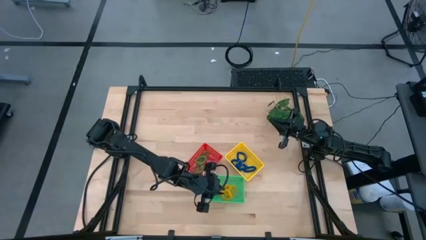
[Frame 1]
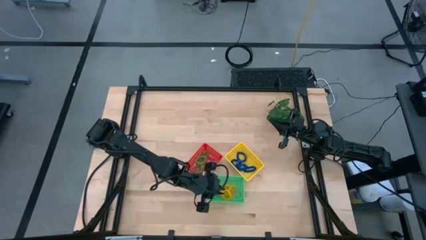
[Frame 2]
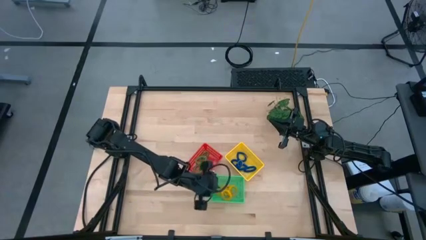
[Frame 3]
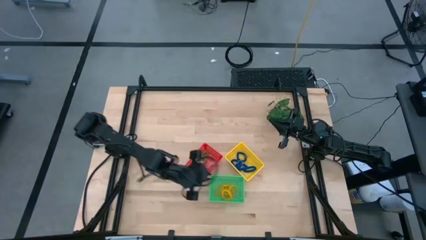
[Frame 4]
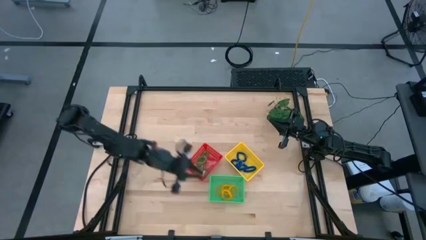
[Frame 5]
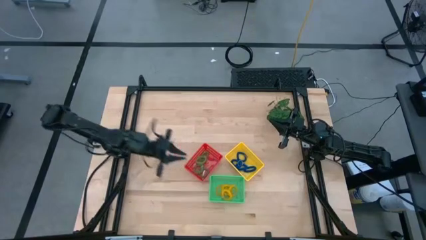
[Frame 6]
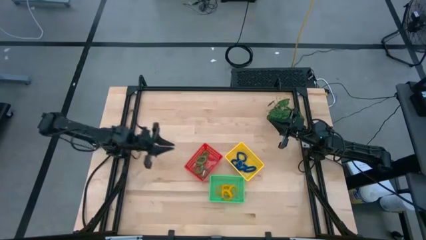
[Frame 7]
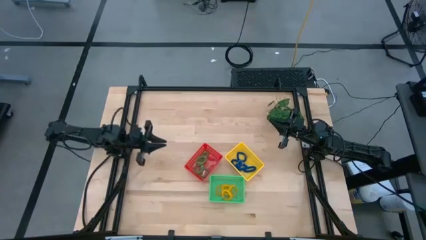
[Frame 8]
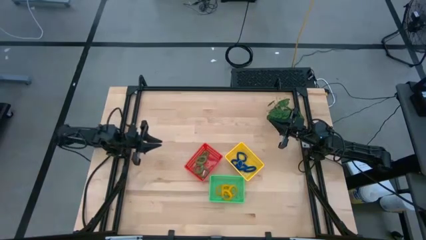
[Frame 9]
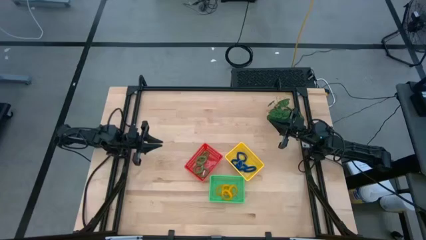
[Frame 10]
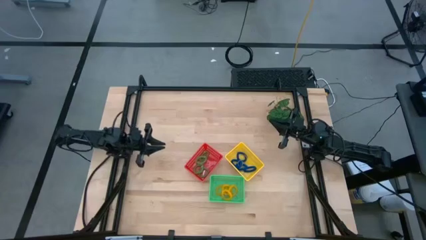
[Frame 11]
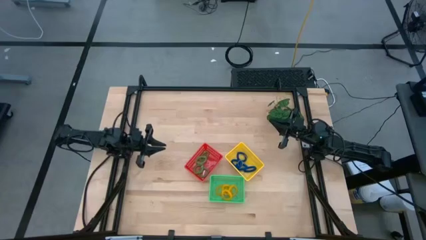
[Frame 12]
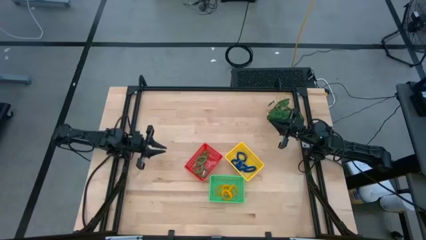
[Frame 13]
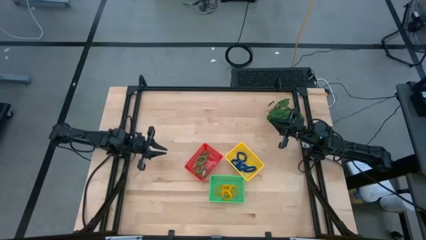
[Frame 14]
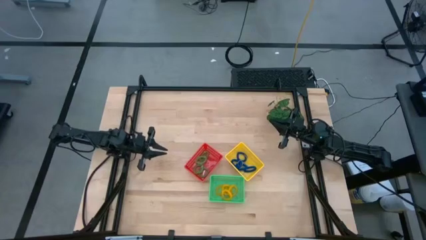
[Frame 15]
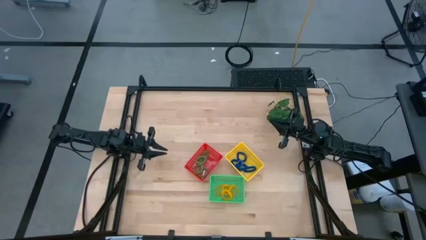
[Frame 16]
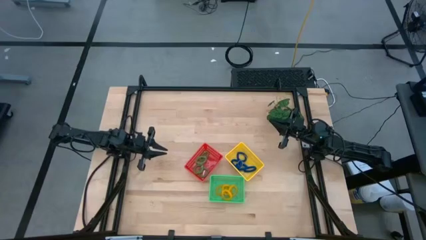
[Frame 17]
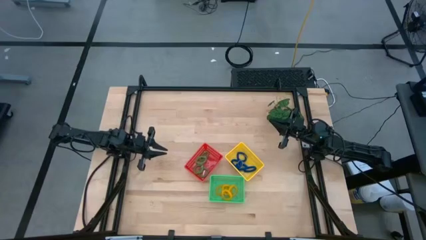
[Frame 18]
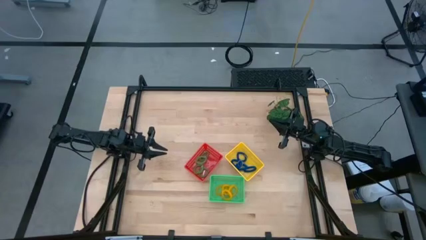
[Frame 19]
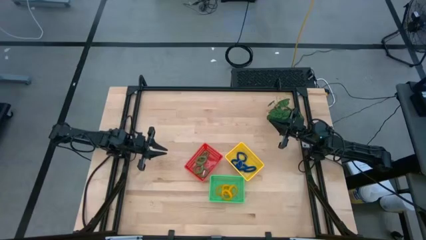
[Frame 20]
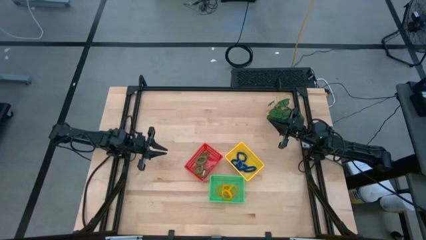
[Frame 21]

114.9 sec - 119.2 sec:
Task: Sort spring keychains
Return to Home Position

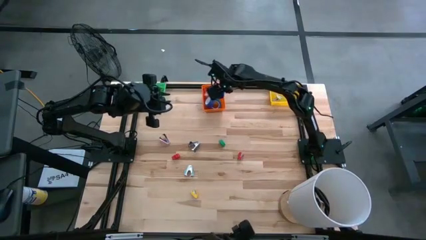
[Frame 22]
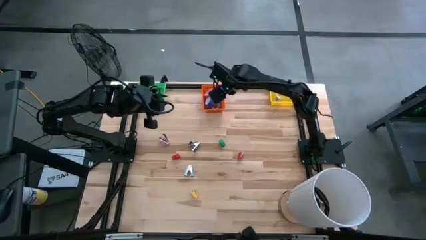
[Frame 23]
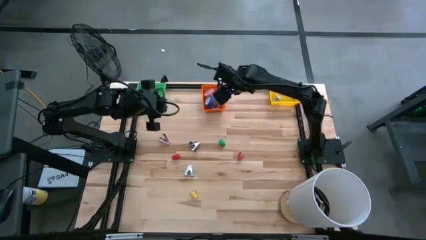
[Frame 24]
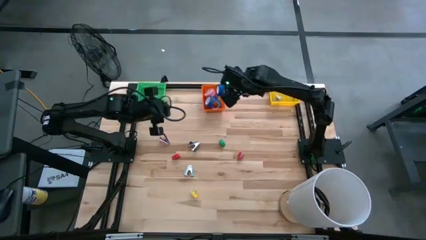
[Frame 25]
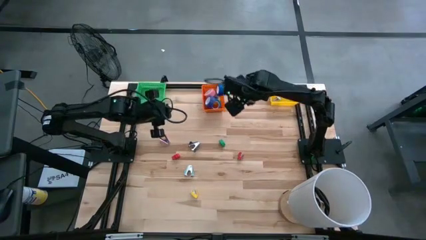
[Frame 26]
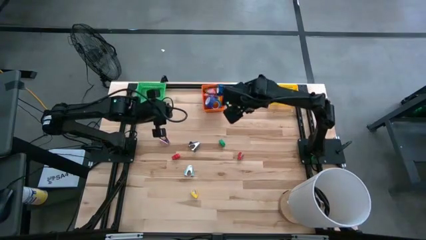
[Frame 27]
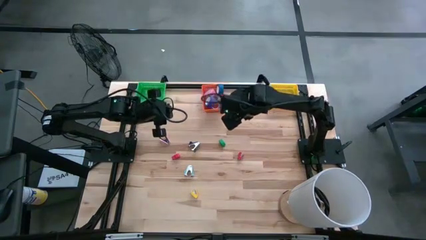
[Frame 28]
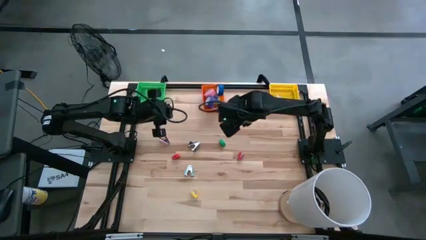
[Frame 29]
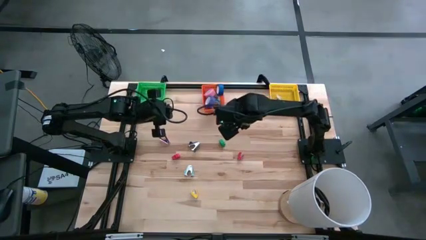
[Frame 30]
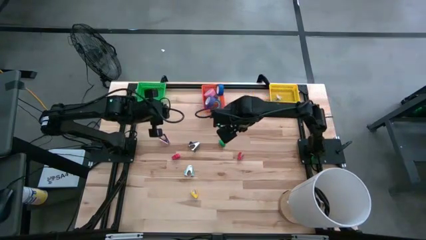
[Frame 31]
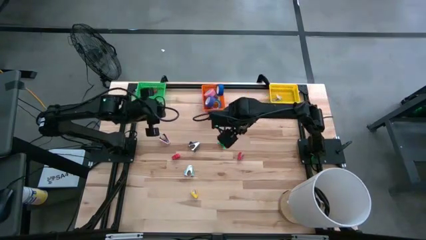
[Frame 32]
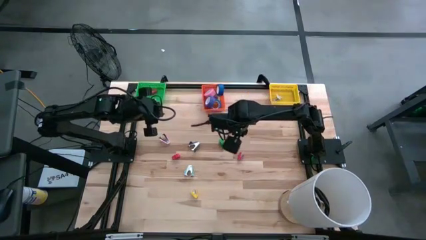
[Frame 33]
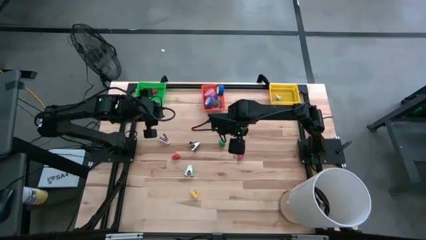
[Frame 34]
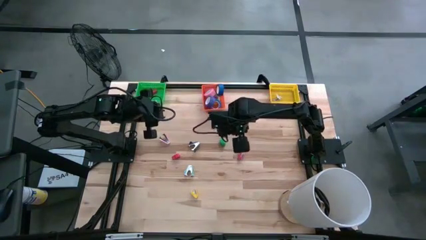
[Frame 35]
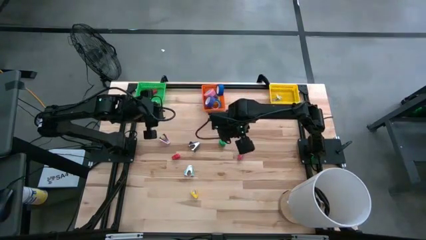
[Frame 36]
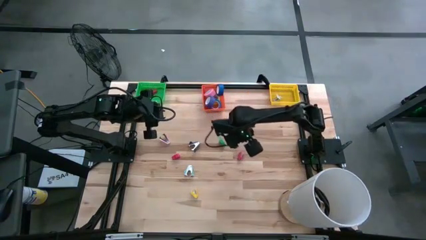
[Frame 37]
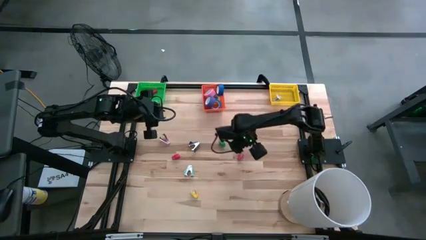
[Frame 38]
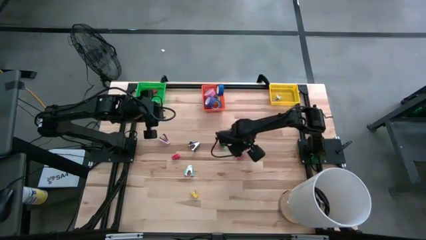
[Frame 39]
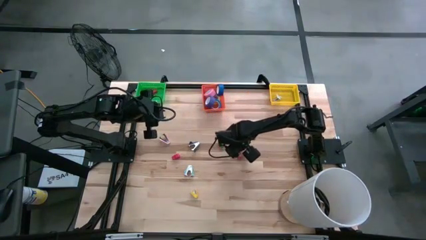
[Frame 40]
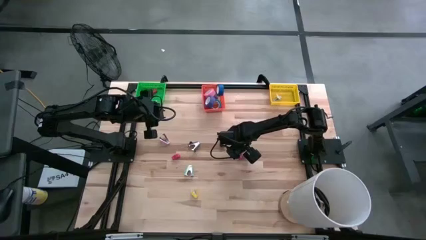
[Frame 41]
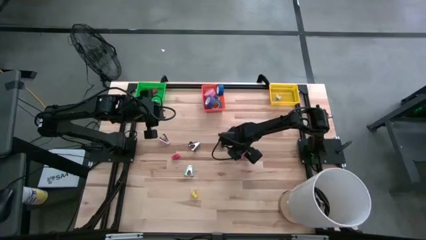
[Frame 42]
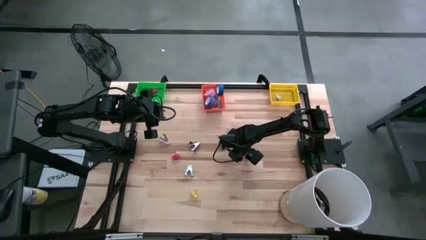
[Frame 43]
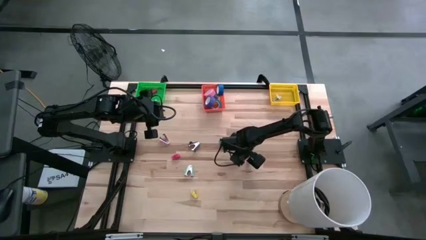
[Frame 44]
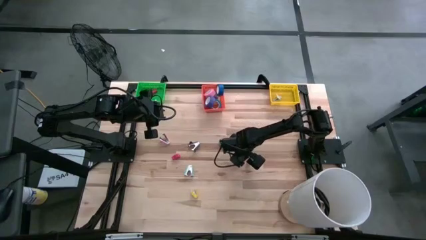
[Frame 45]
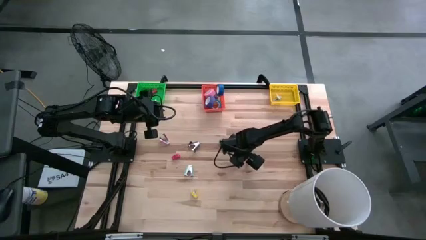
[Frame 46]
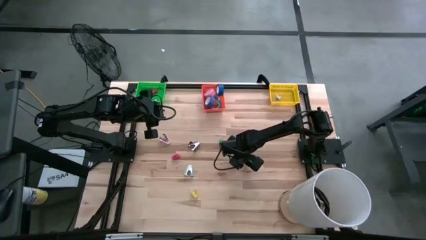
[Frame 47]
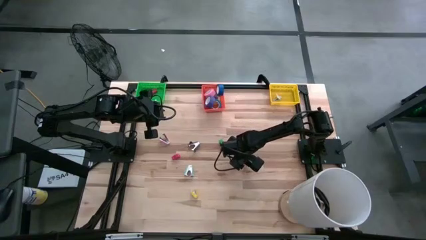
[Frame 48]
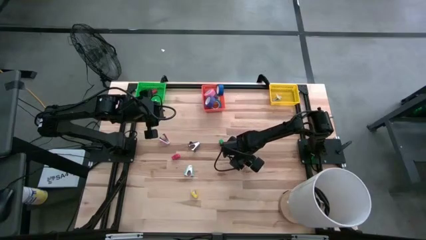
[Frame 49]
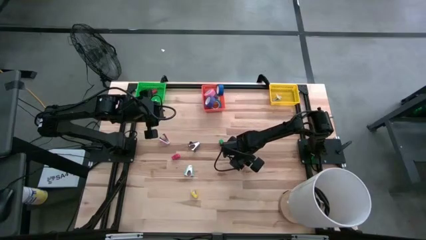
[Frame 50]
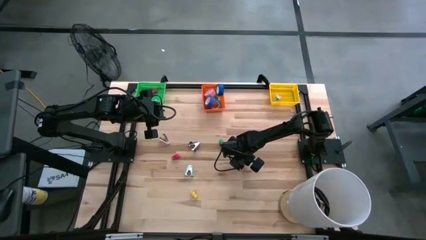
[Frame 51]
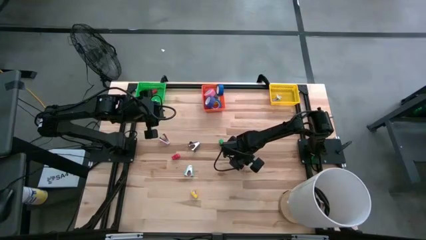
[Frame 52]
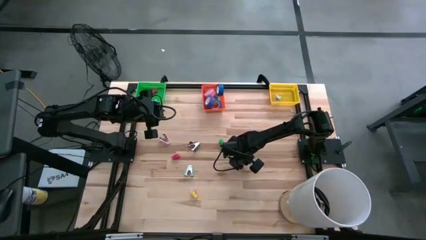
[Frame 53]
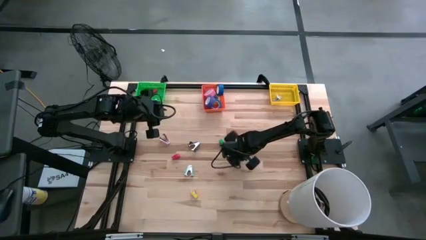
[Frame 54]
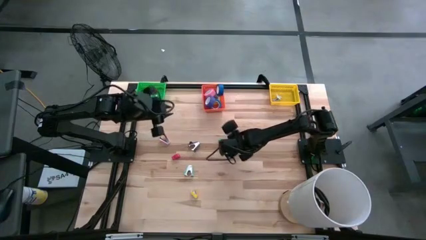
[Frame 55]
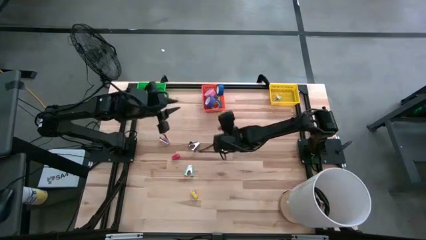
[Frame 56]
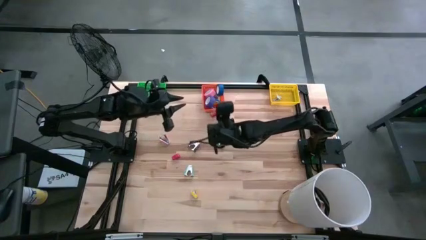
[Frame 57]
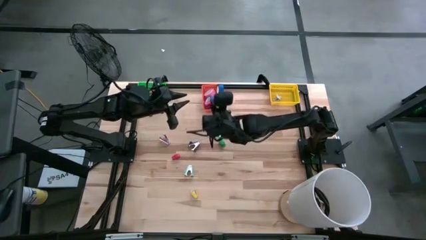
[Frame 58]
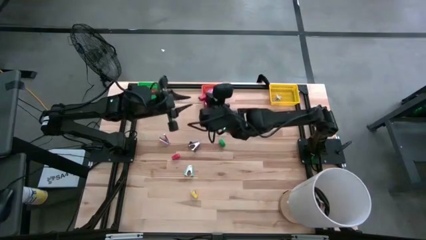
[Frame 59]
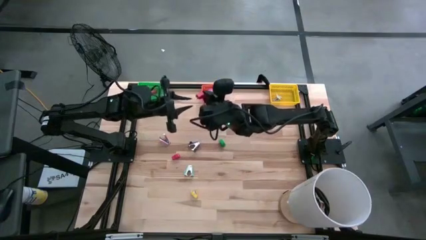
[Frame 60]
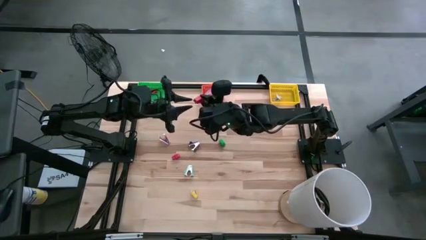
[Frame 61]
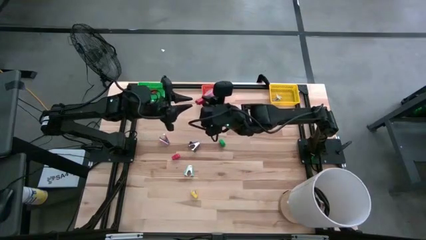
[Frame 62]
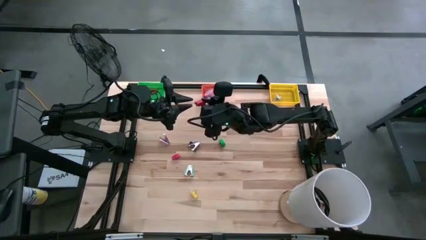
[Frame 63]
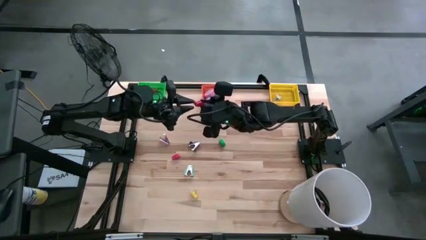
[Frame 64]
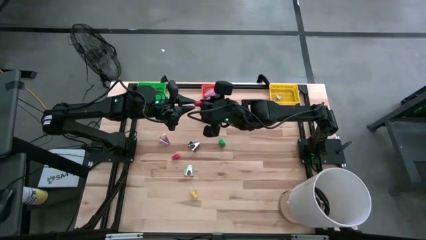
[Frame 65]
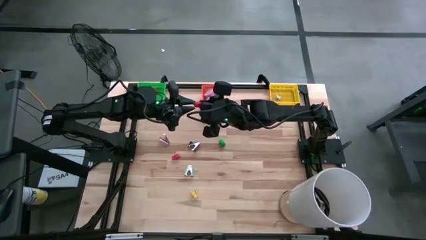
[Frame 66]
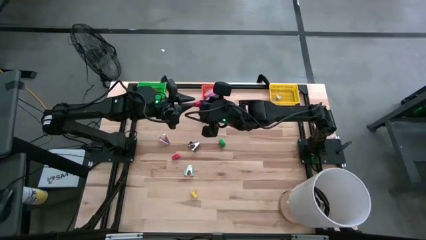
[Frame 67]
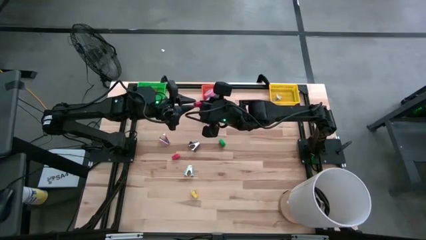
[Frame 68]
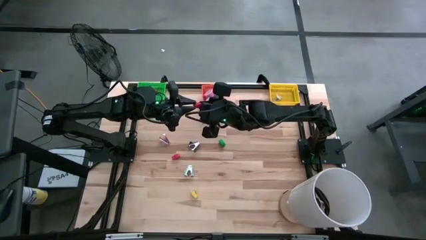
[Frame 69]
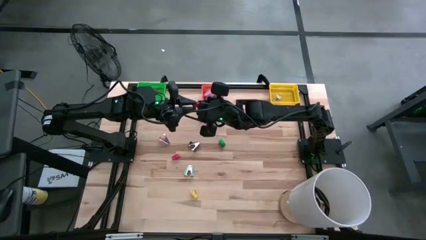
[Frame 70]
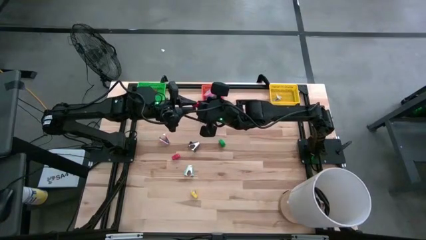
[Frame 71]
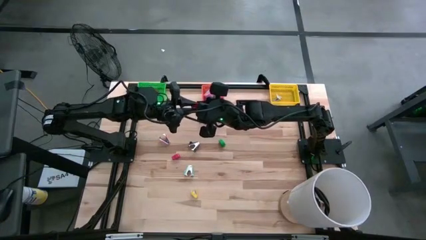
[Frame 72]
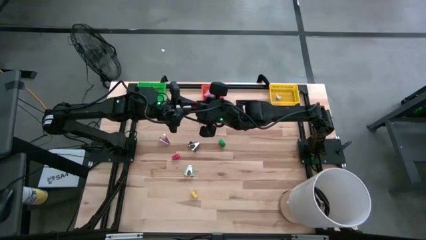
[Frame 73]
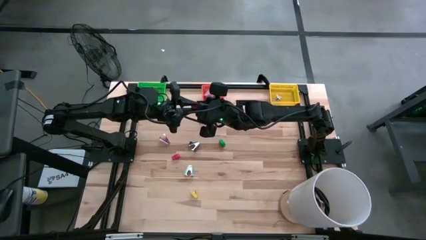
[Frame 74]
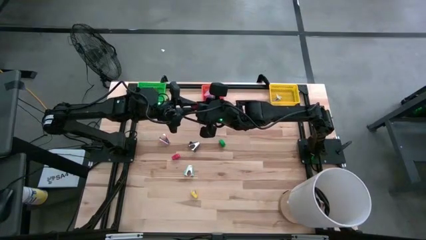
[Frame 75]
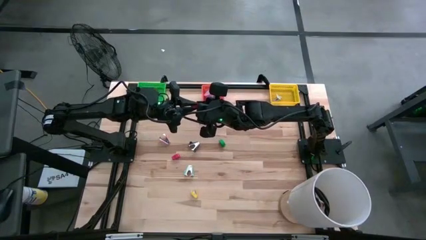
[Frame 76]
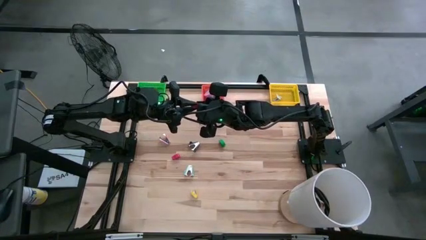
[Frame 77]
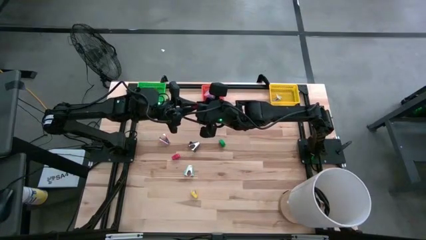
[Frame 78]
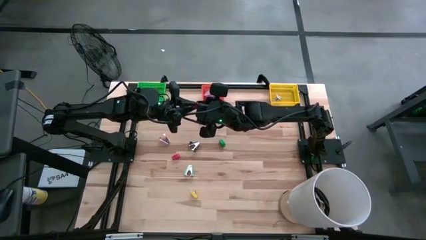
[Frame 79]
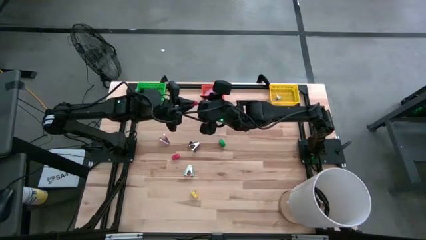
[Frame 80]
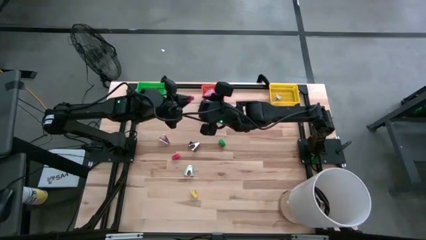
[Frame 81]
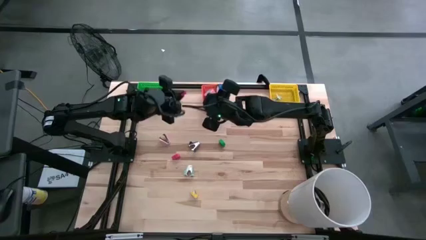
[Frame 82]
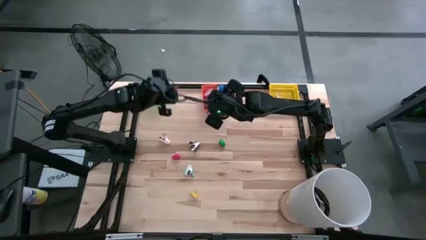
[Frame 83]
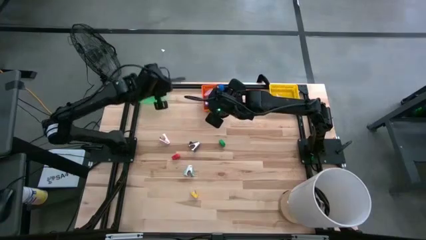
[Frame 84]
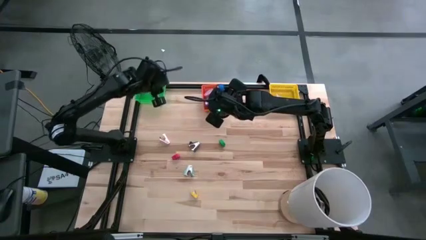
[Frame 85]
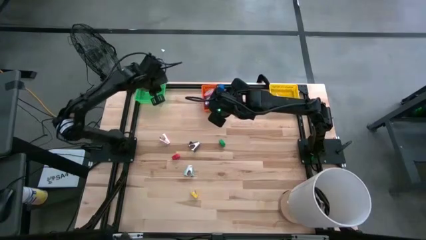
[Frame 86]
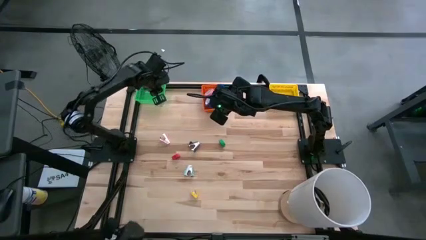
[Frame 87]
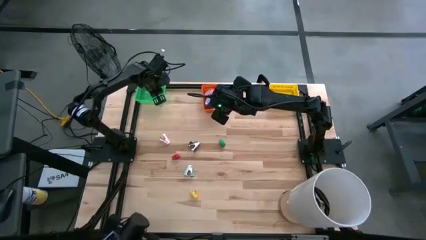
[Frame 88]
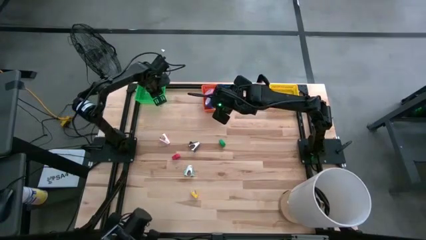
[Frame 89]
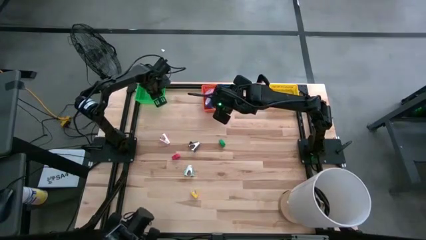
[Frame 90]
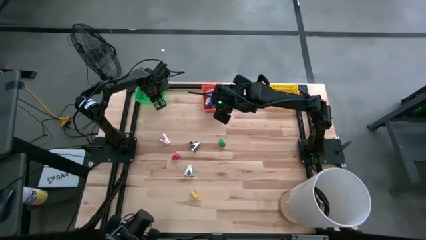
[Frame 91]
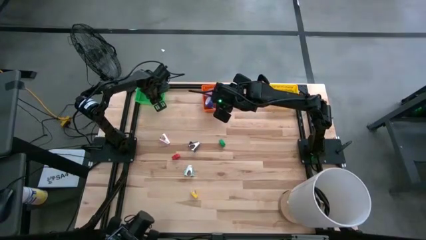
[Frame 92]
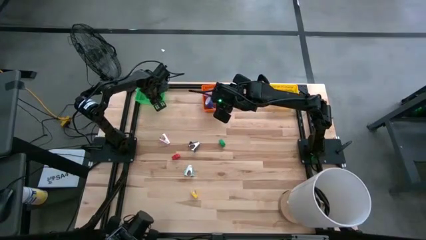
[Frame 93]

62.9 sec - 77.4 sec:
Task: Pick and place Stapler, Stapler remover, tape
Put the right red stapler into the green bin
